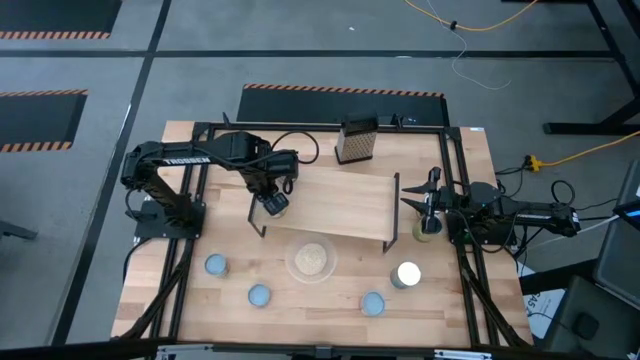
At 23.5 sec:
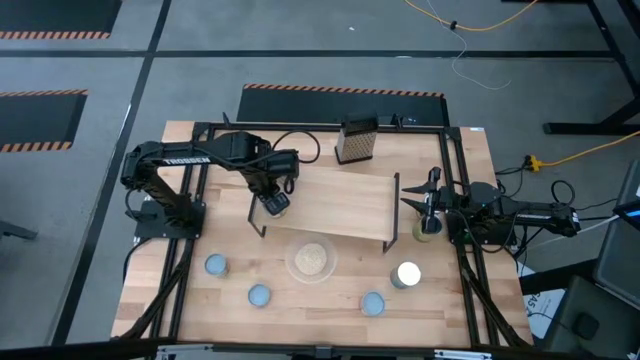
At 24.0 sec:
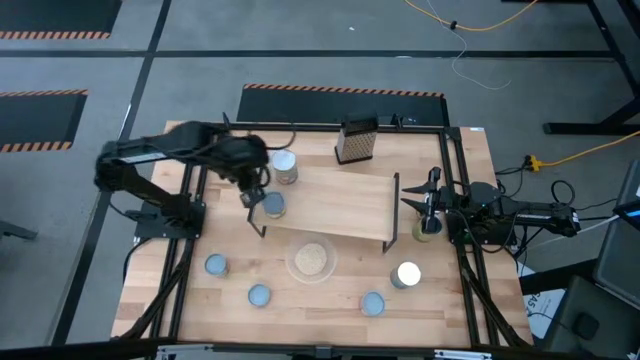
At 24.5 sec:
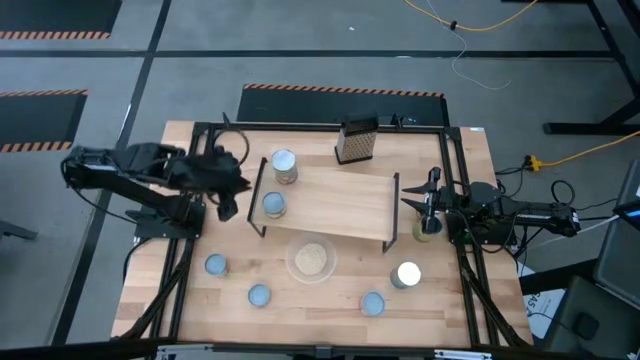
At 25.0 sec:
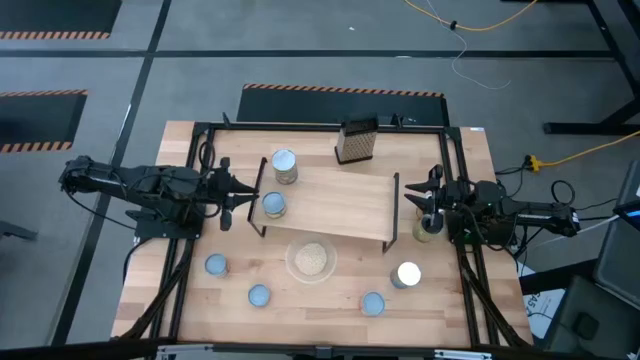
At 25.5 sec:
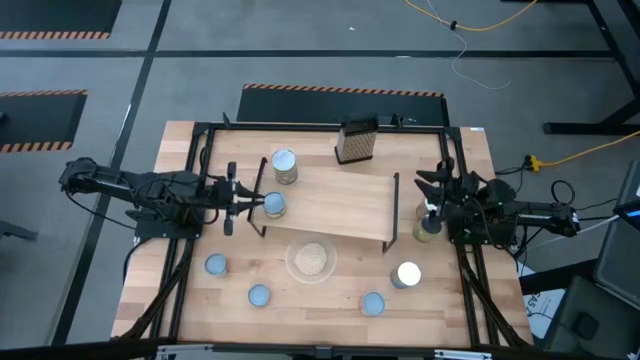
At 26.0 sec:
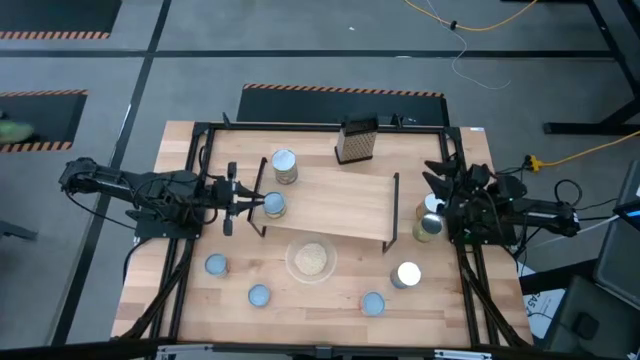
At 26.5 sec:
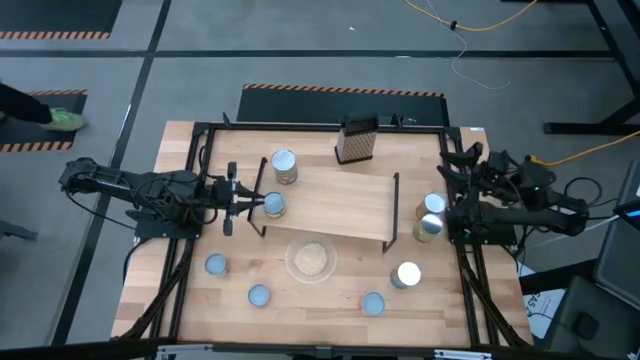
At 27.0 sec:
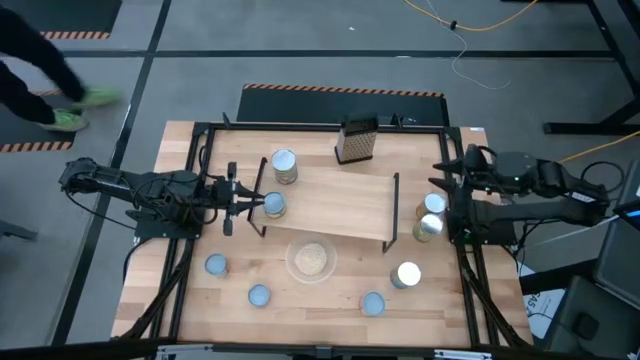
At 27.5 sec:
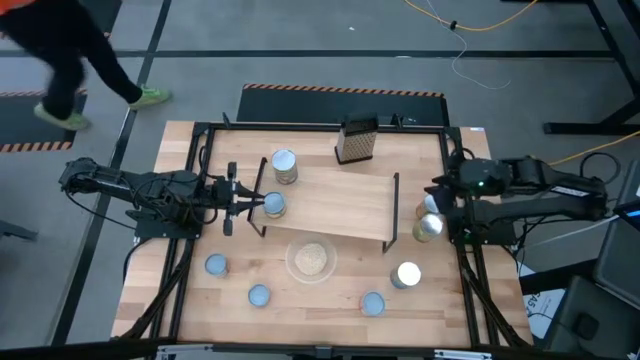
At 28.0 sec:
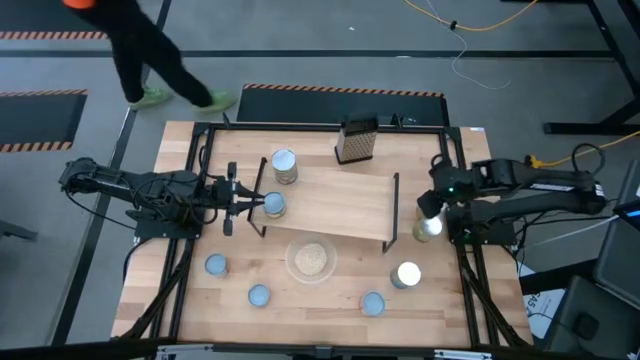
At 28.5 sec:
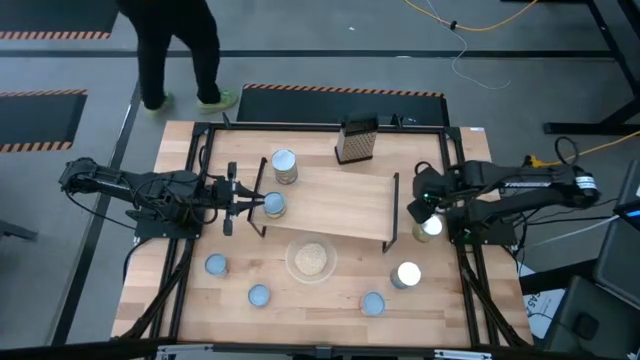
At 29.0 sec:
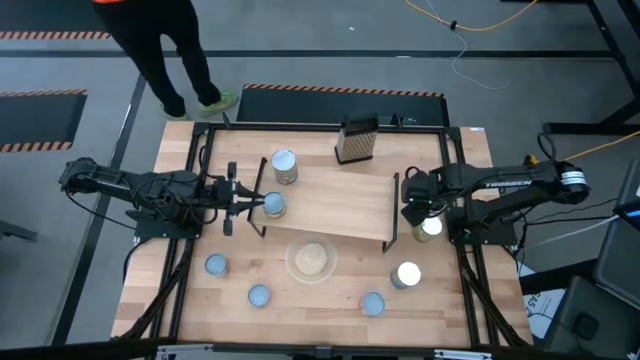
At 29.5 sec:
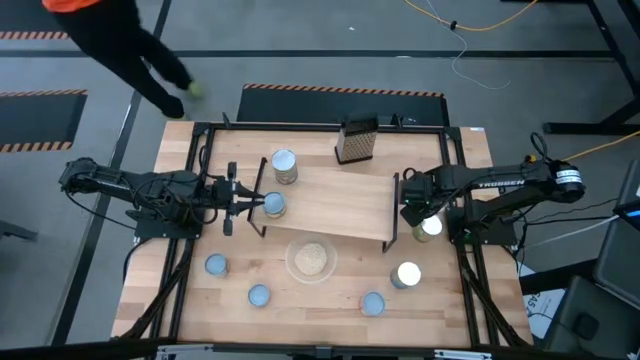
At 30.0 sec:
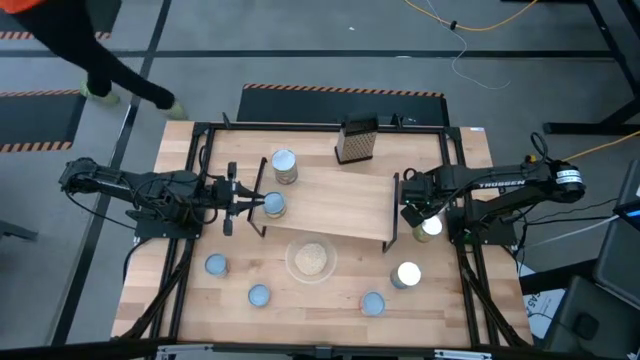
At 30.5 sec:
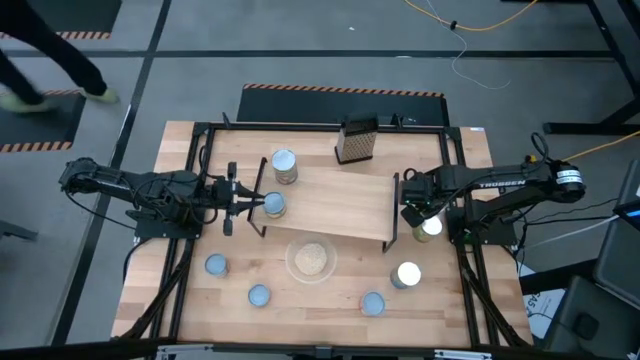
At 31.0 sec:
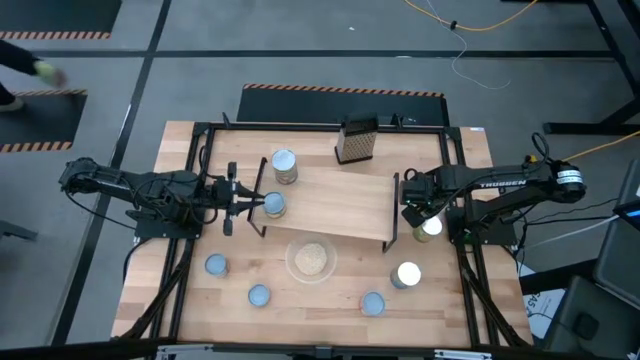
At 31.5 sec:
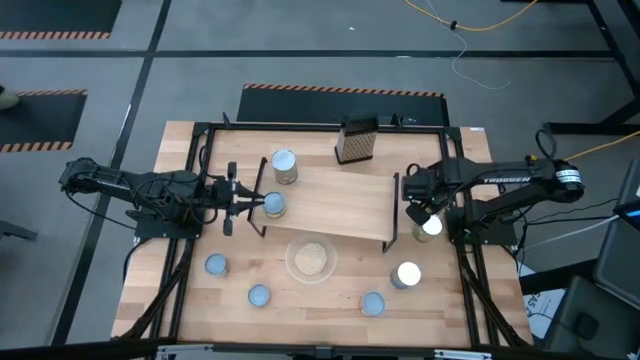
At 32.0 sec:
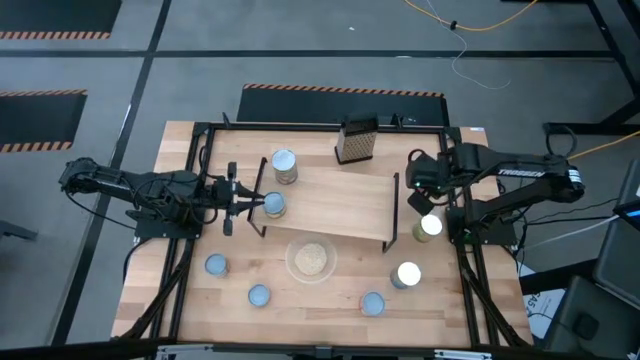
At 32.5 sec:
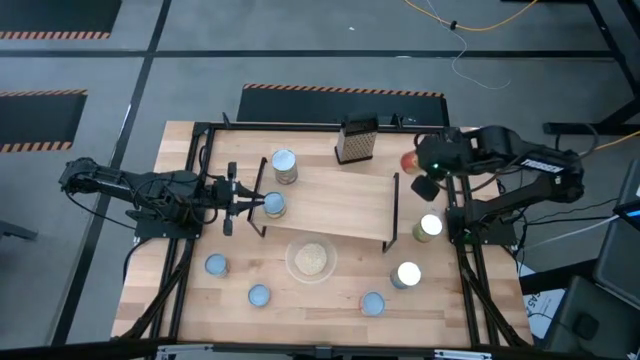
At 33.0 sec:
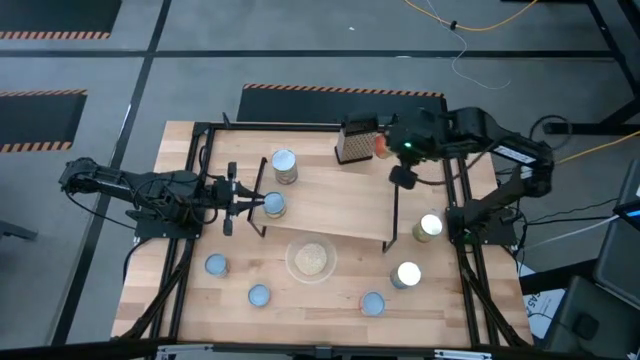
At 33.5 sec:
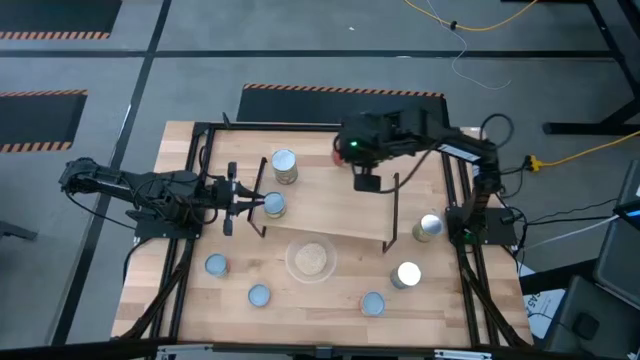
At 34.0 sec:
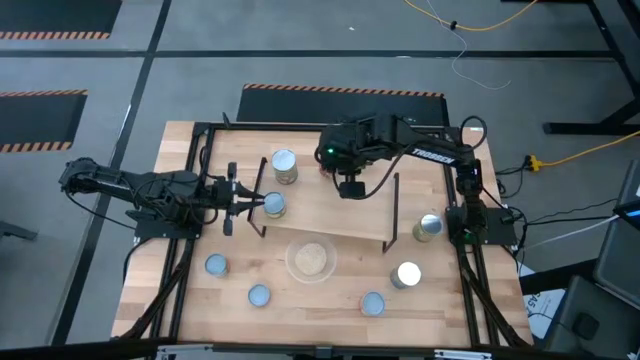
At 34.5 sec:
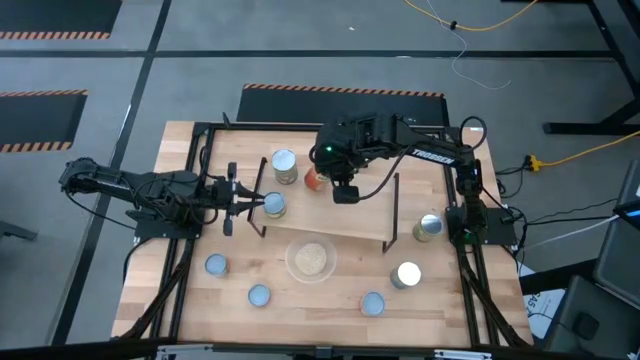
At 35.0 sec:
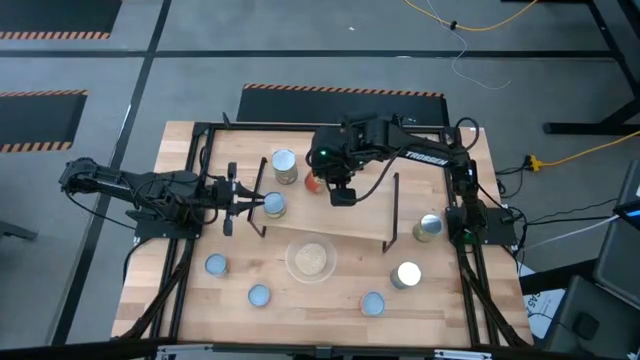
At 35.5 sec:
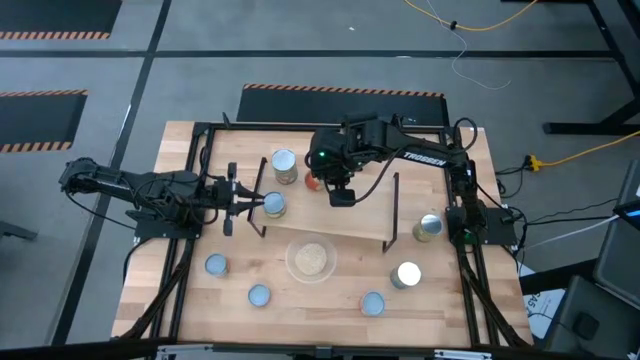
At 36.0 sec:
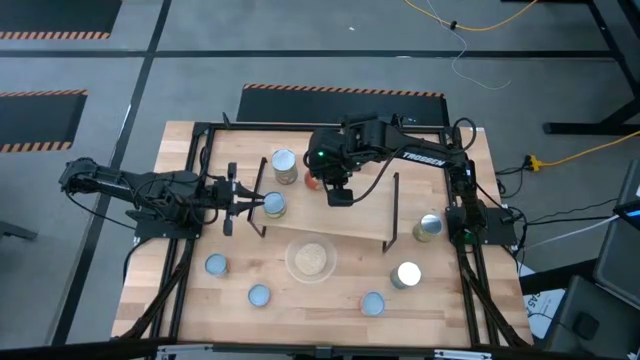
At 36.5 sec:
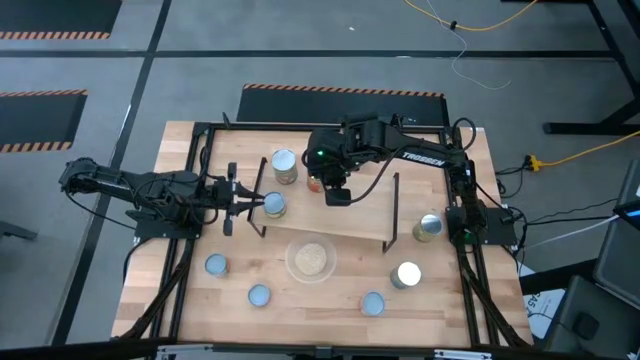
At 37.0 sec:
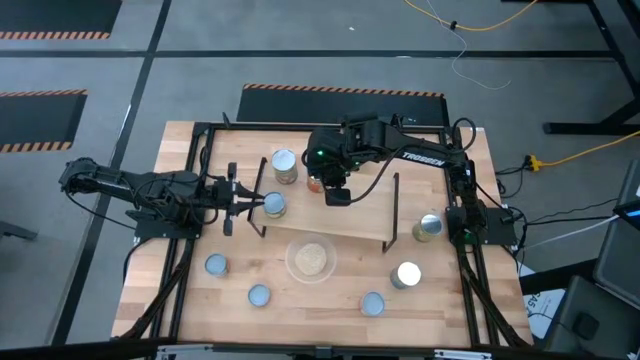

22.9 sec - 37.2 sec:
Task: Pick and place cans onto a shelf
Put the large canned pineapples on the shelf

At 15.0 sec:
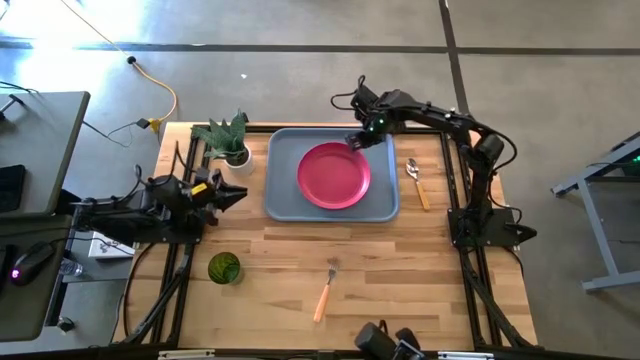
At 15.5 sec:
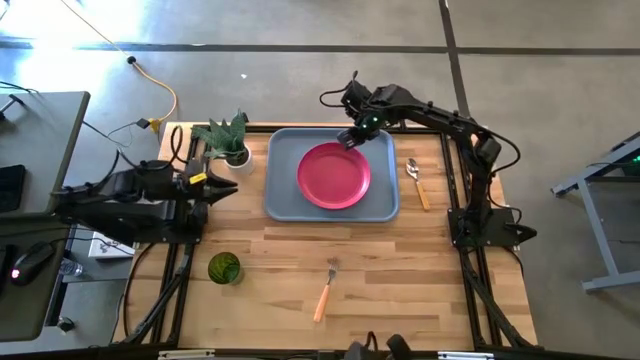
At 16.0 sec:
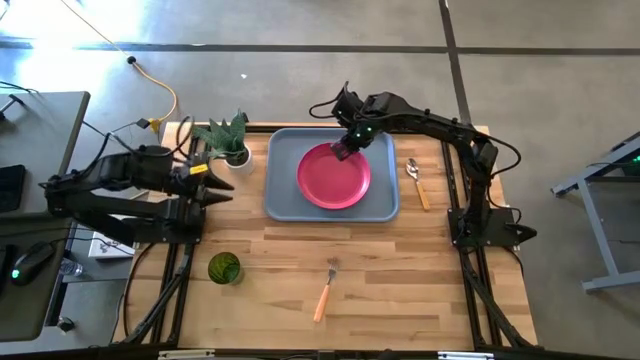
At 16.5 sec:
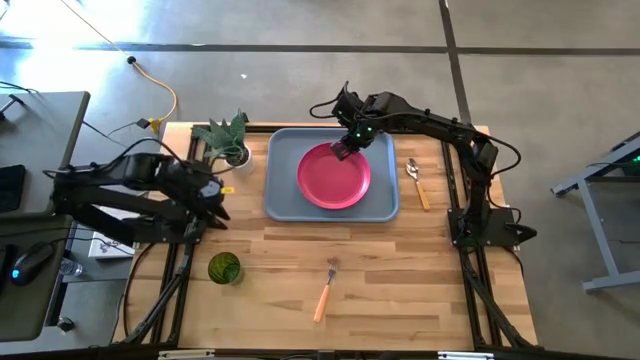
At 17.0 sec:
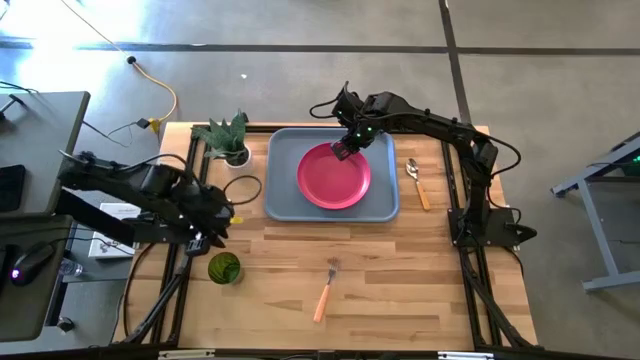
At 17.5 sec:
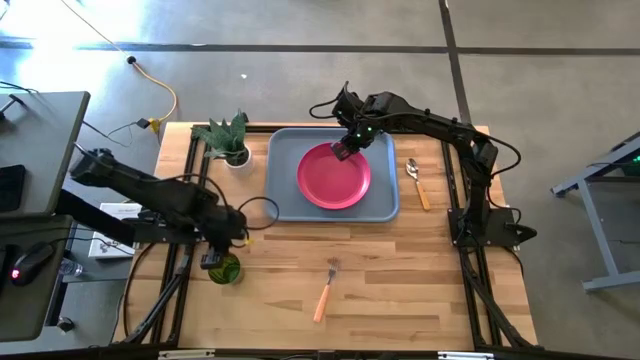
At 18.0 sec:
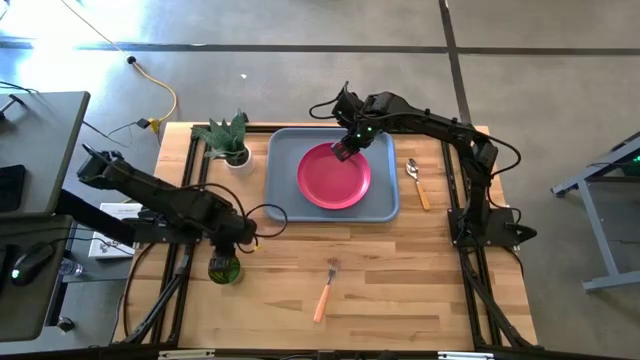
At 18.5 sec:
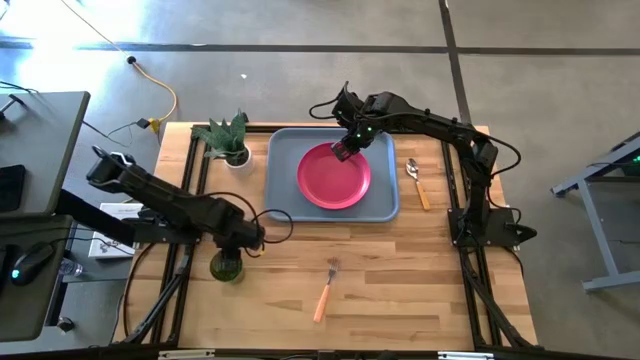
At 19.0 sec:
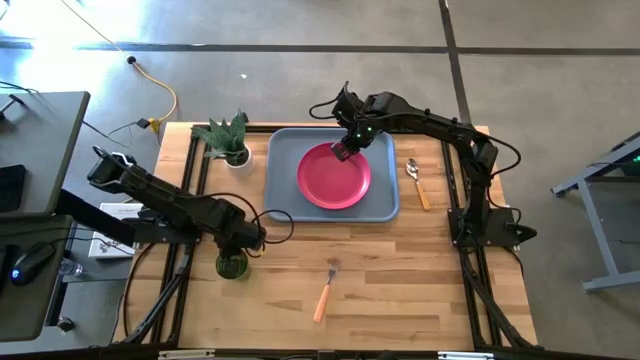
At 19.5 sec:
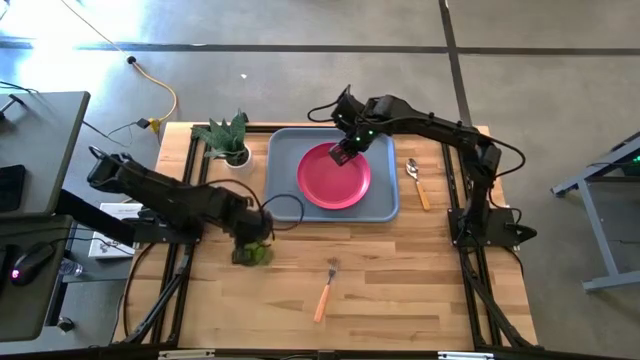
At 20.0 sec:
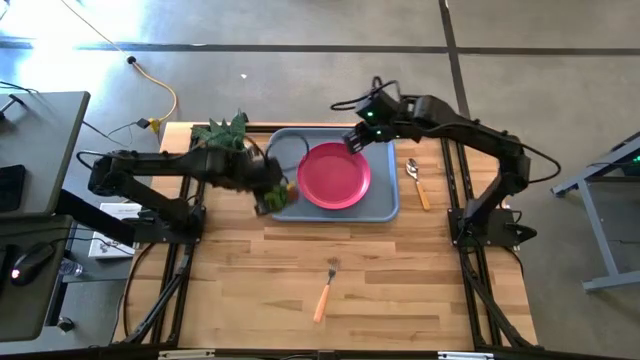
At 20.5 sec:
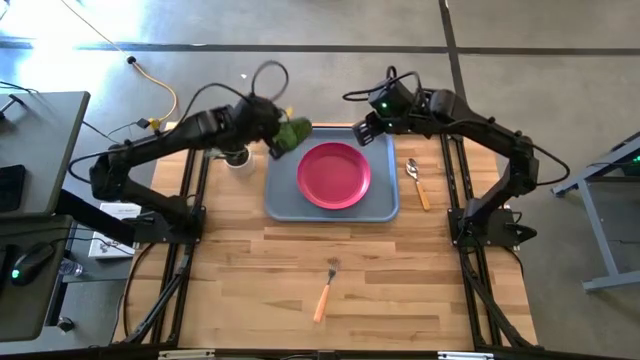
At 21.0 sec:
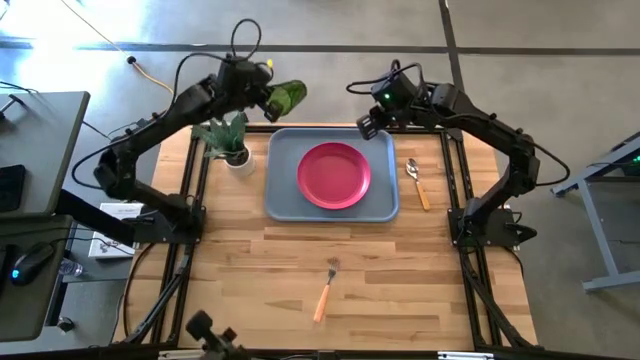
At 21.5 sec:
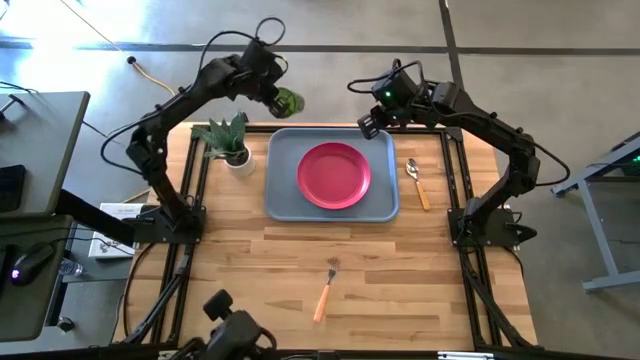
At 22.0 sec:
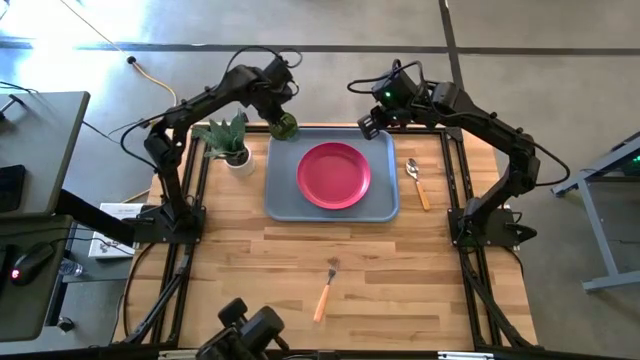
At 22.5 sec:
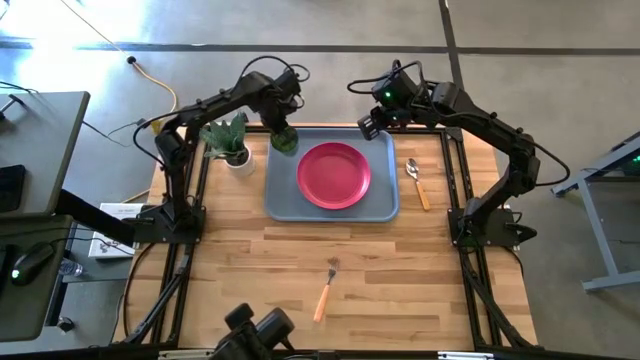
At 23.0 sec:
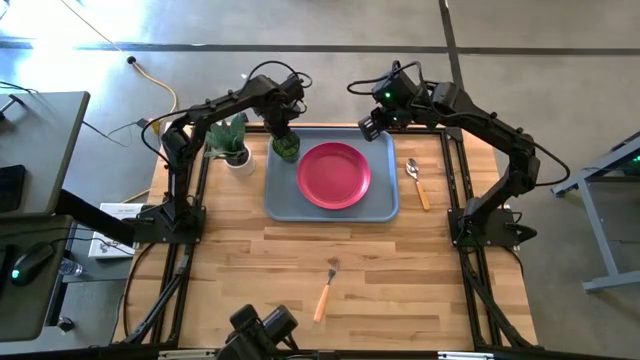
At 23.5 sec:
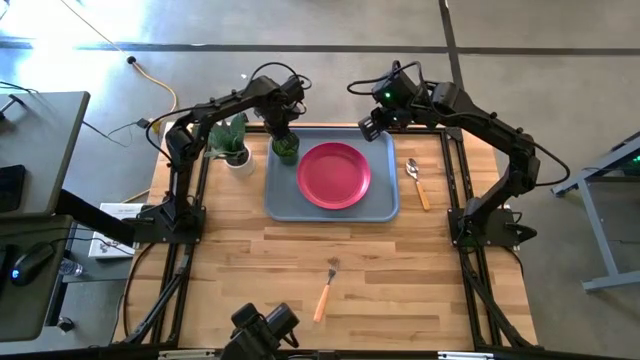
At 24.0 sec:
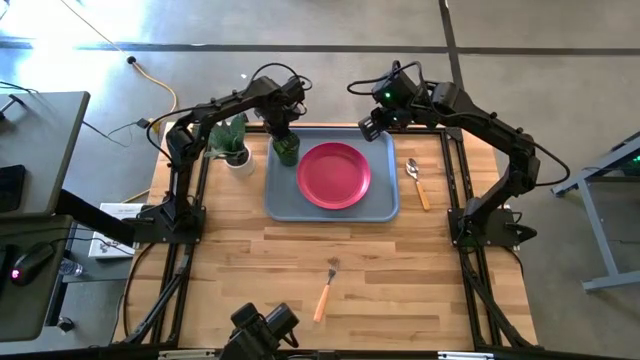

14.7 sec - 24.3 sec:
Task: Pick and place plate/cup/fork/spoon on tray
Put the green cup on the gray tray
